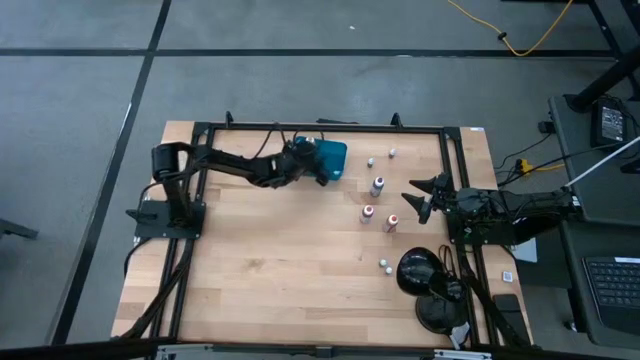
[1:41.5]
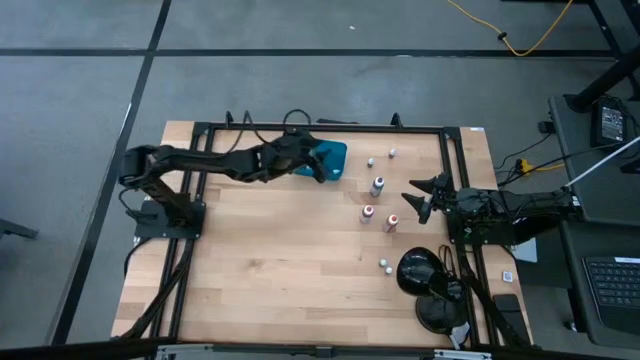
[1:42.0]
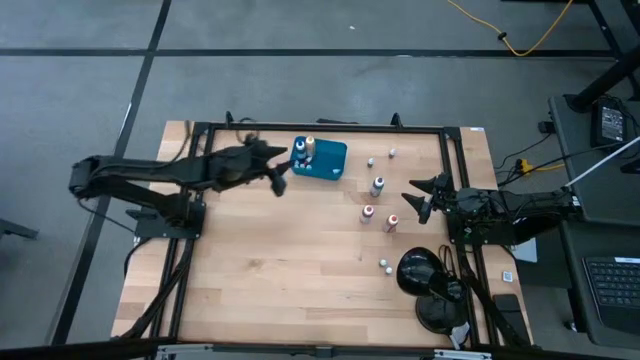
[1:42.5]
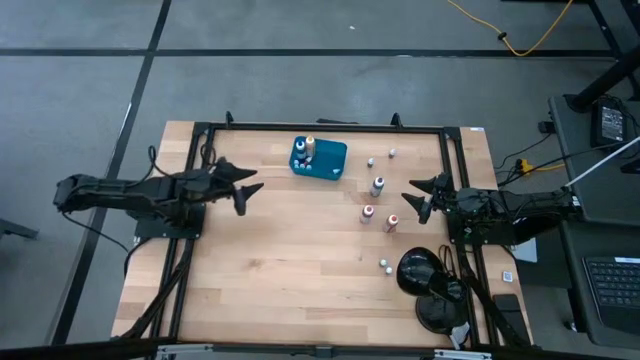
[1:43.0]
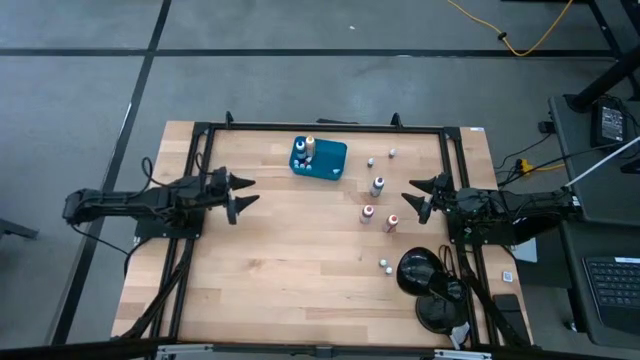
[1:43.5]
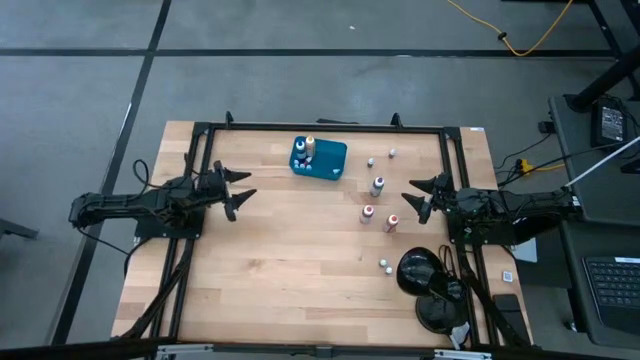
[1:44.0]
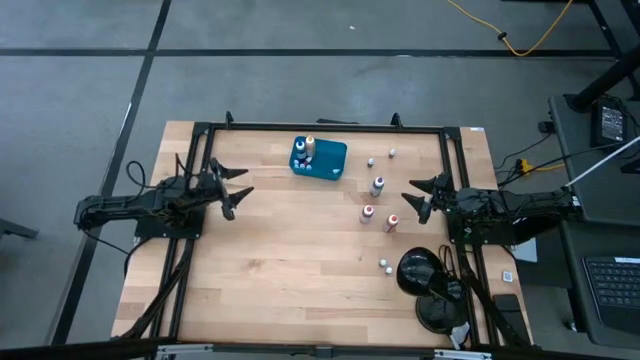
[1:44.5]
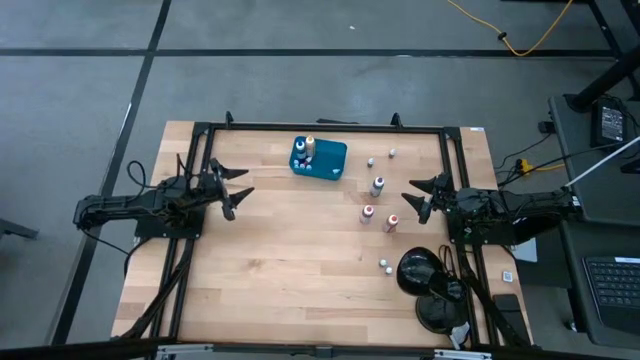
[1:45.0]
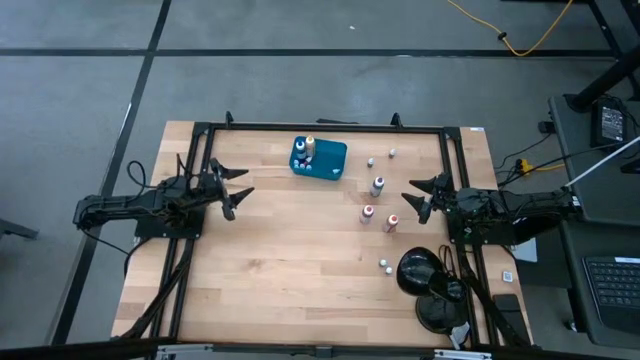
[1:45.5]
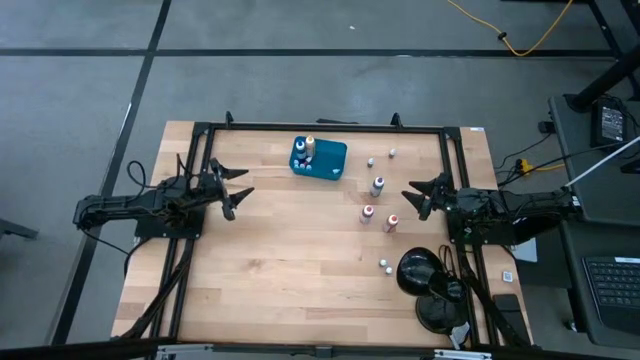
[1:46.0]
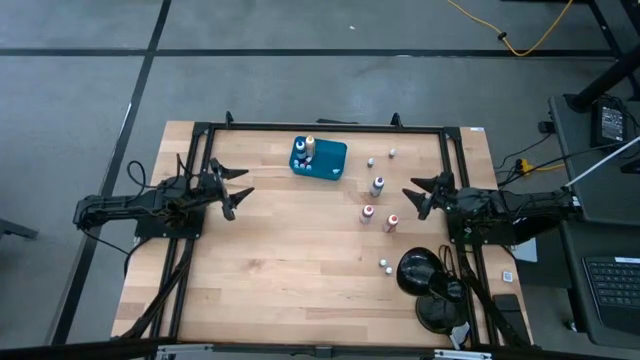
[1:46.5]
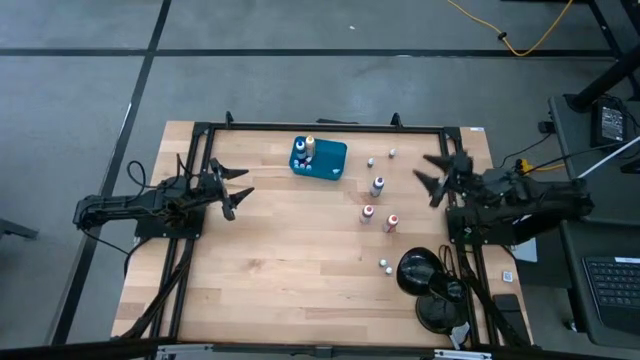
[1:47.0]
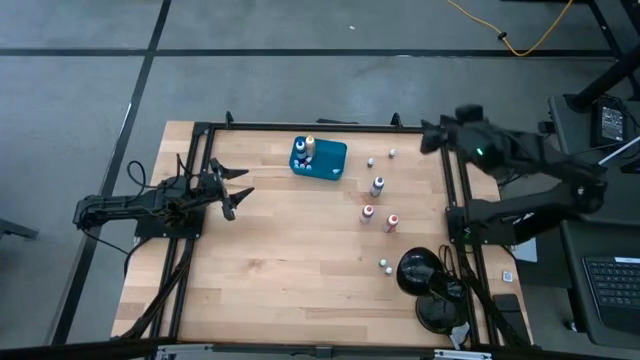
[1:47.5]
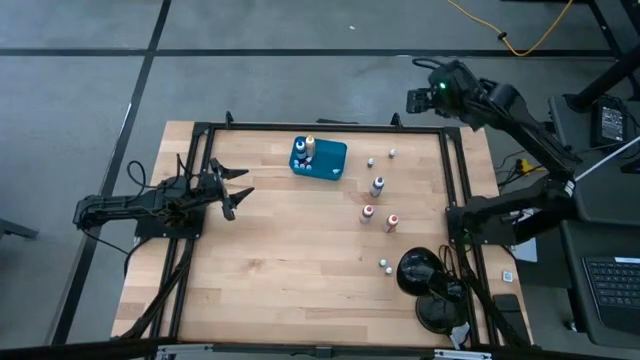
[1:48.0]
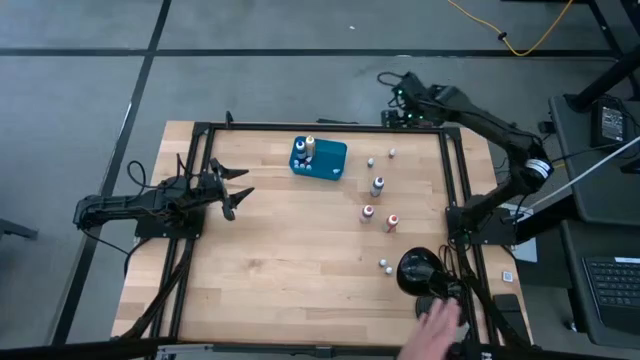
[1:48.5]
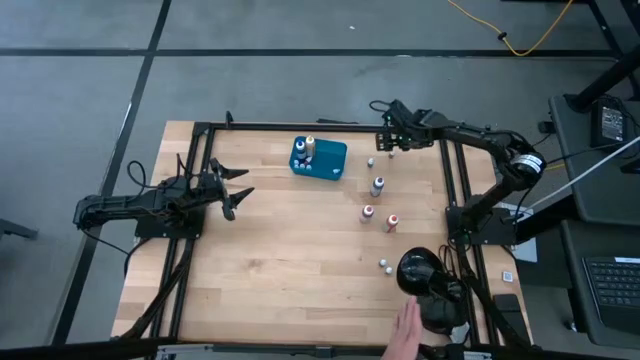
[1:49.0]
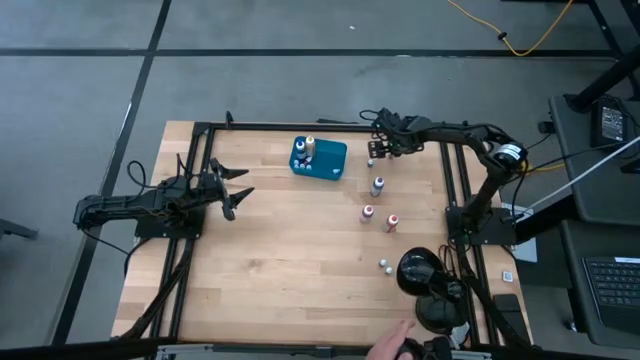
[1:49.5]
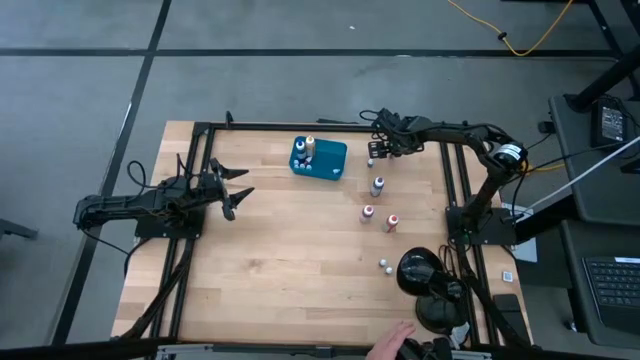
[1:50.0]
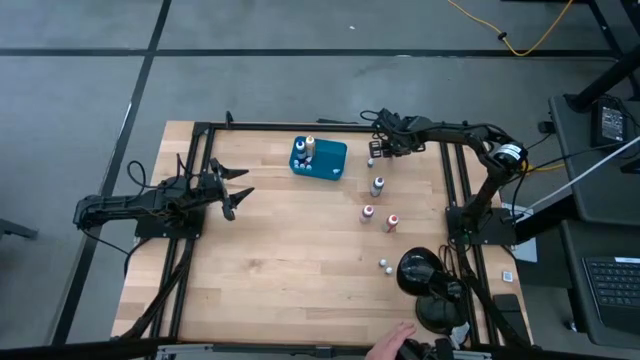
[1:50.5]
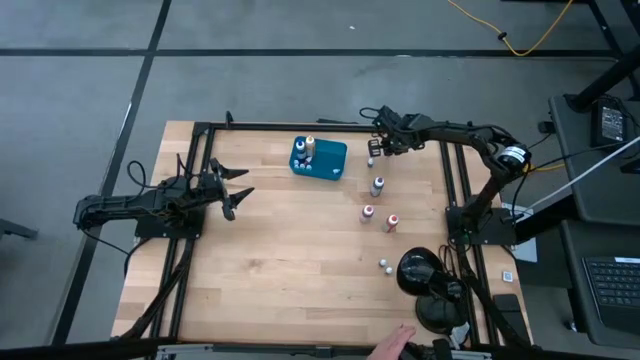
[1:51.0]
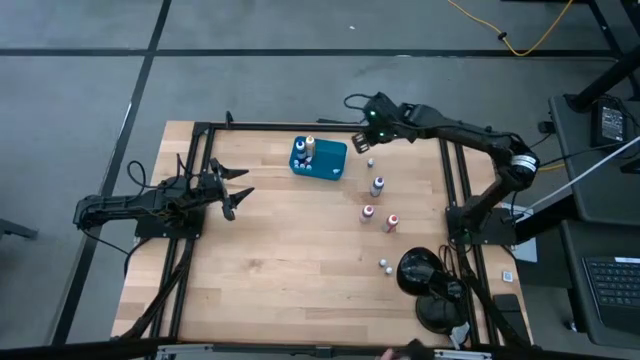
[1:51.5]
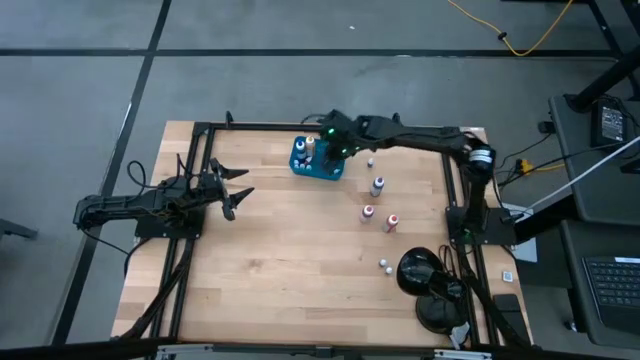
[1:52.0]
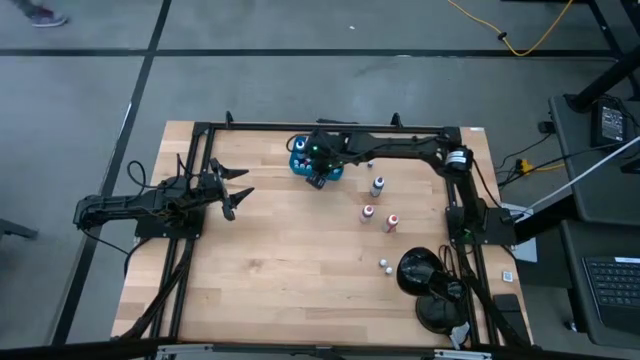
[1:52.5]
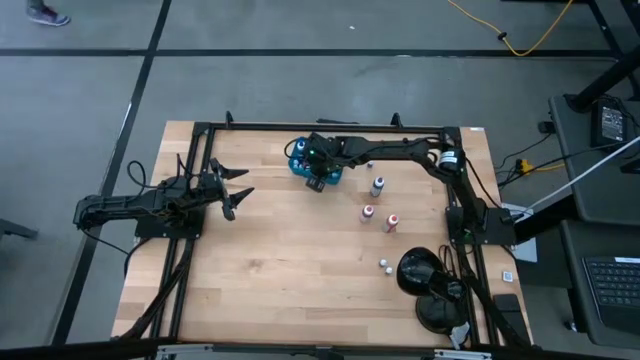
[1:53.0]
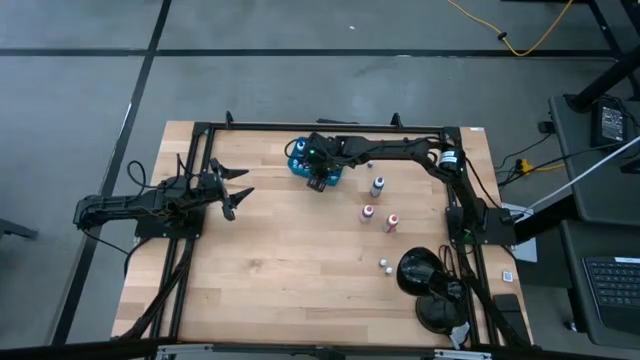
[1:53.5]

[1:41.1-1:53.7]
Task: Pick & Place food coloring
Put the small red food coloring bottle into the blue bin

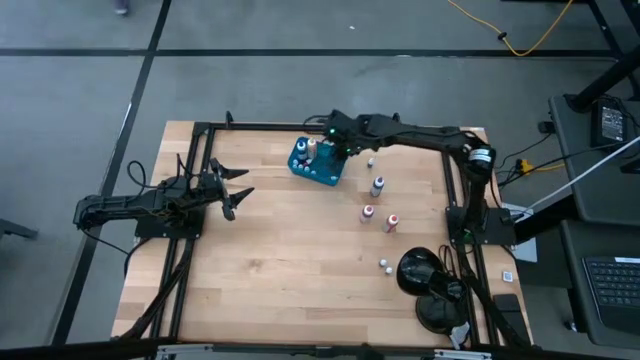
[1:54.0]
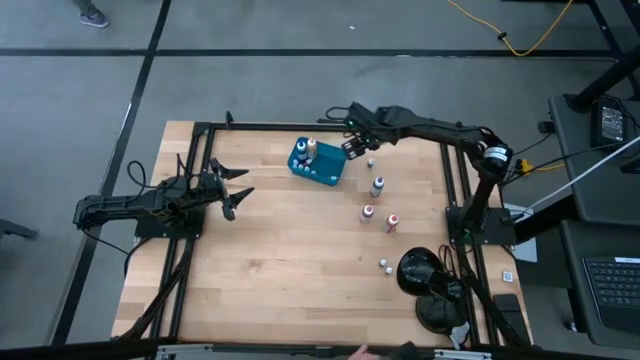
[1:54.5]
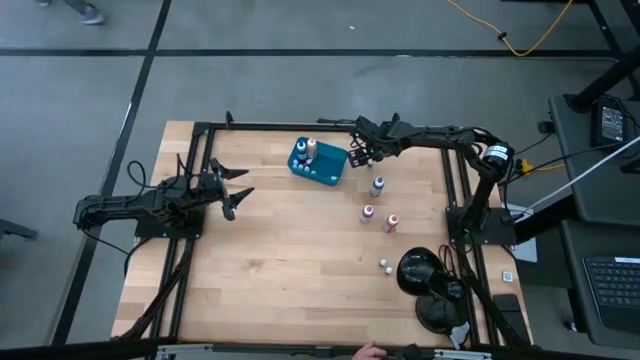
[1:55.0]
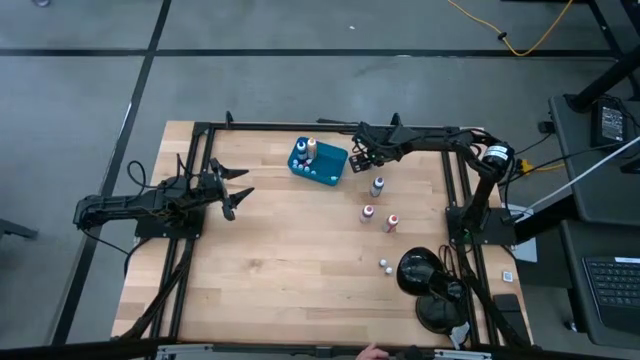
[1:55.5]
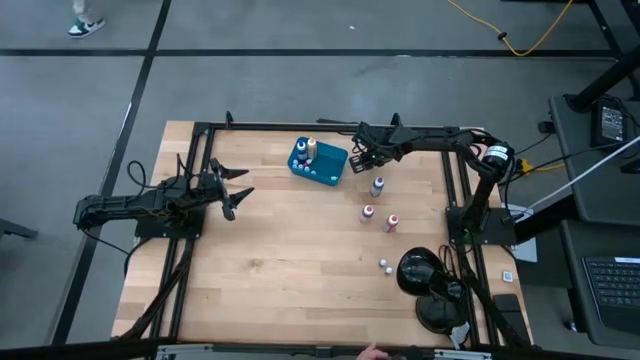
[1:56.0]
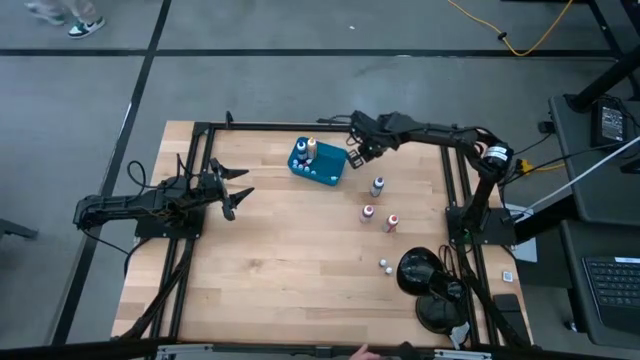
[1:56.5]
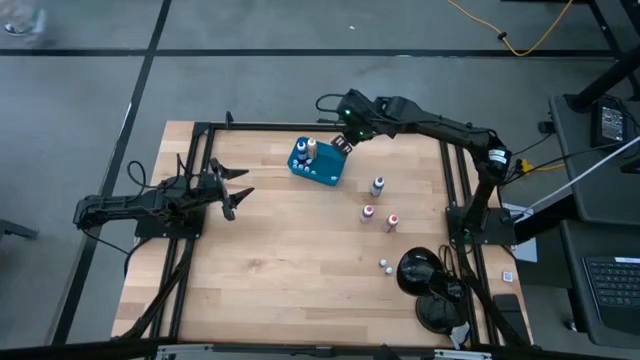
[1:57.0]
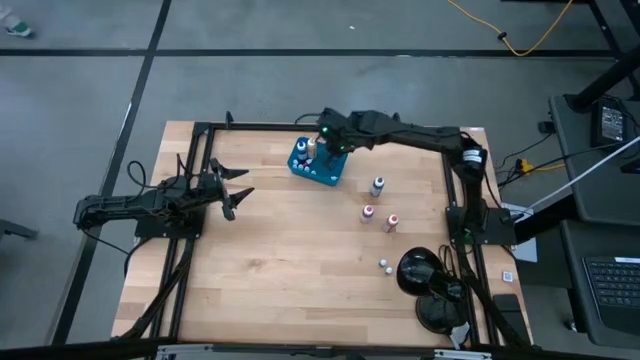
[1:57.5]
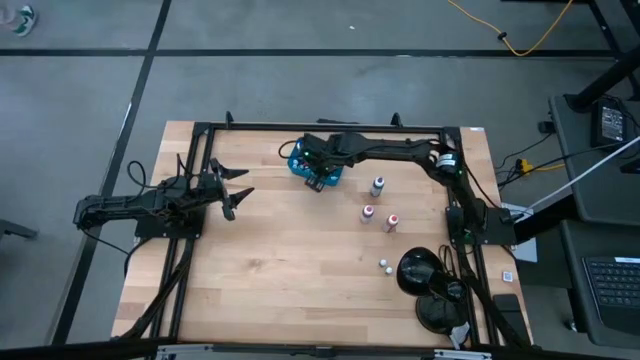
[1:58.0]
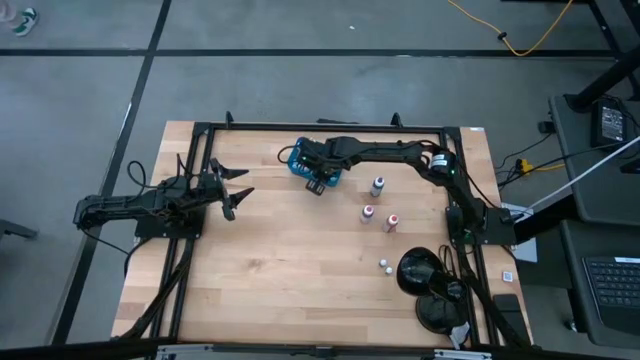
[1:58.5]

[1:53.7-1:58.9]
Put the small black food coloring bottle into the blue bin

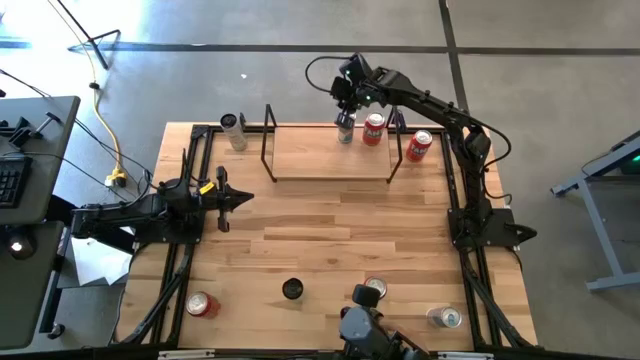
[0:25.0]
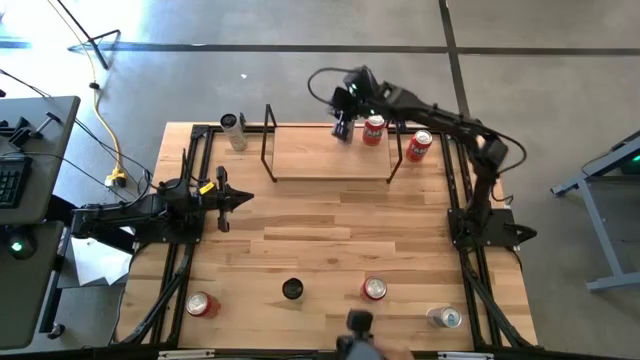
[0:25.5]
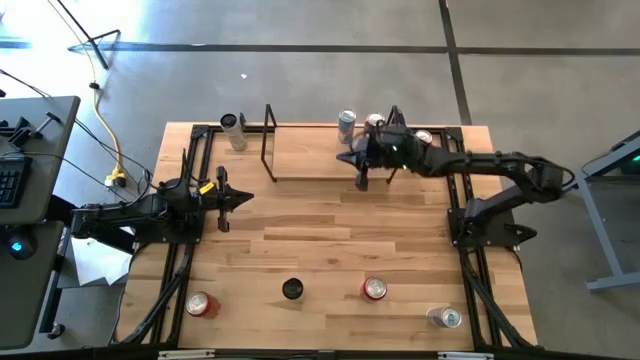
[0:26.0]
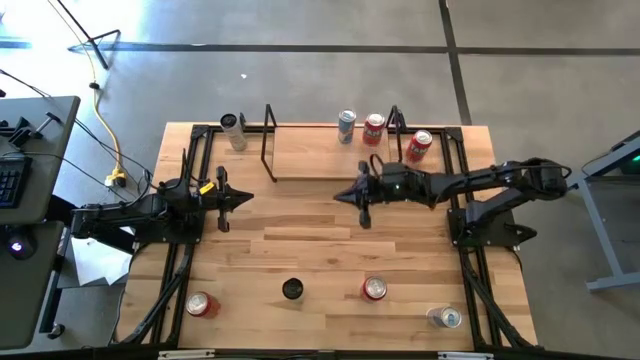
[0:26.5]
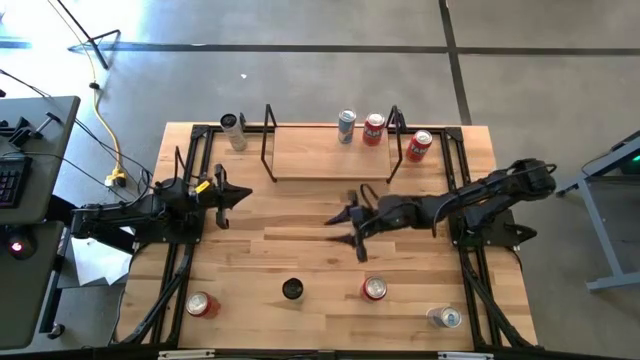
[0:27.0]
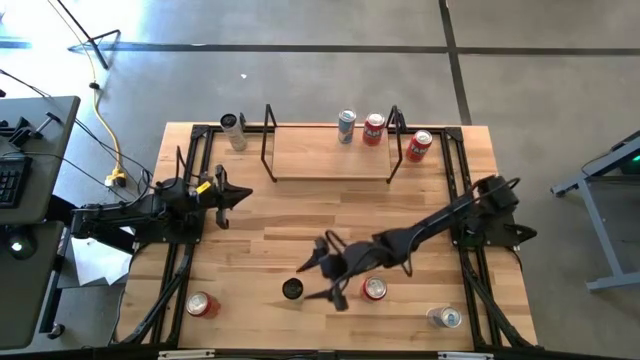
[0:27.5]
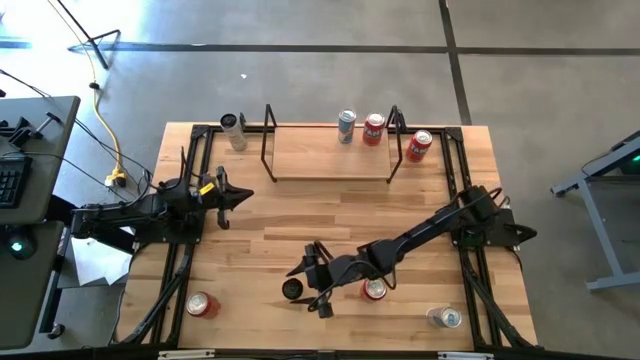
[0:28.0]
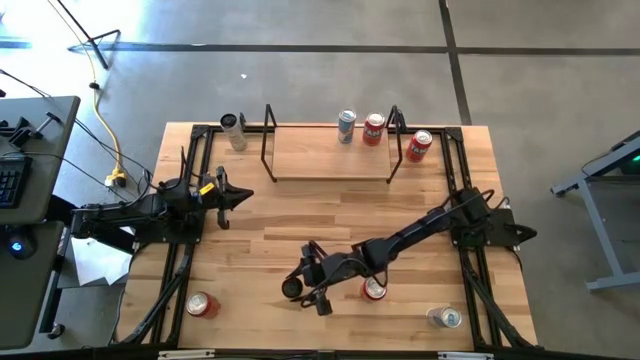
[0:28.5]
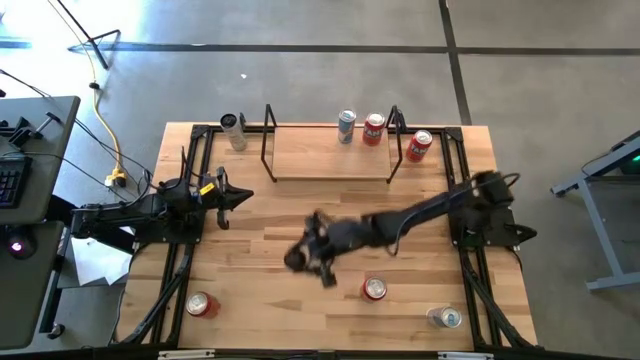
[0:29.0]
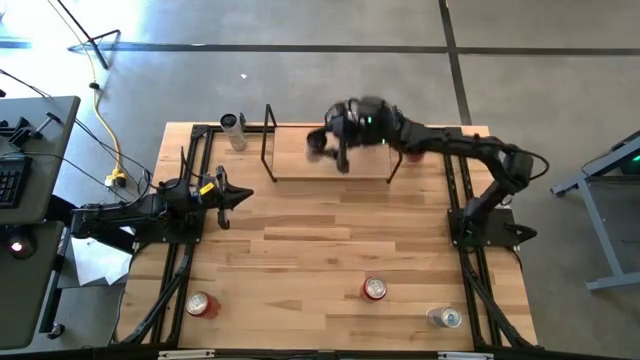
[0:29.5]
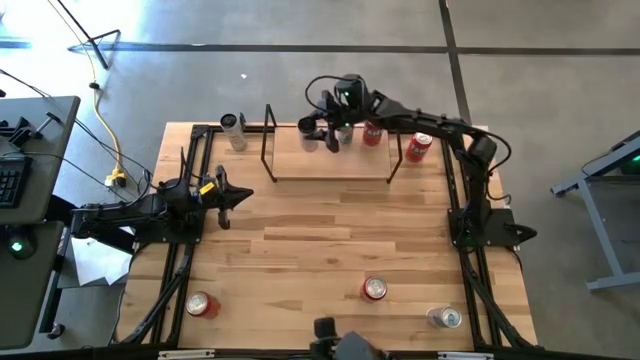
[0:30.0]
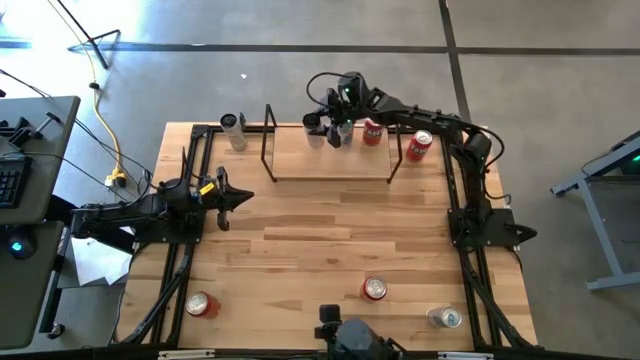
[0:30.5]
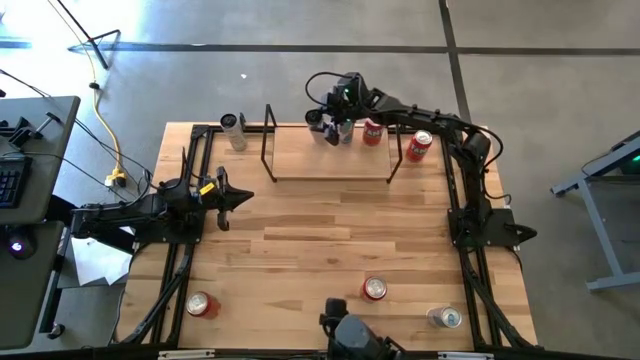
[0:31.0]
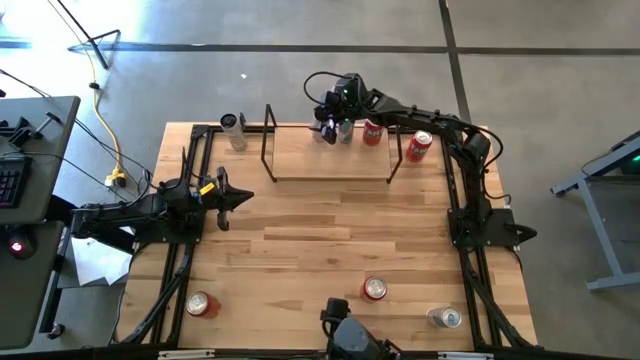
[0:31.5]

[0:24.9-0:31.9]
Task: Place canned beverage on shelf
Put the bottom white yellow soda can on the shelf
